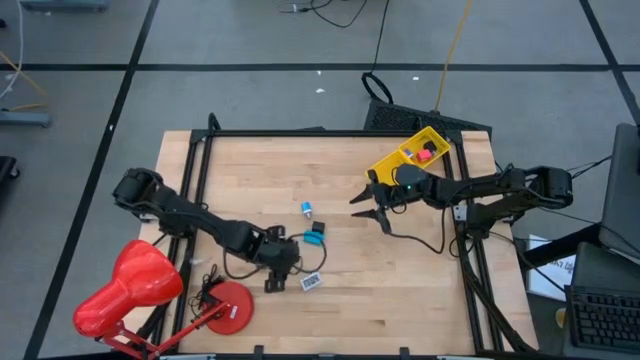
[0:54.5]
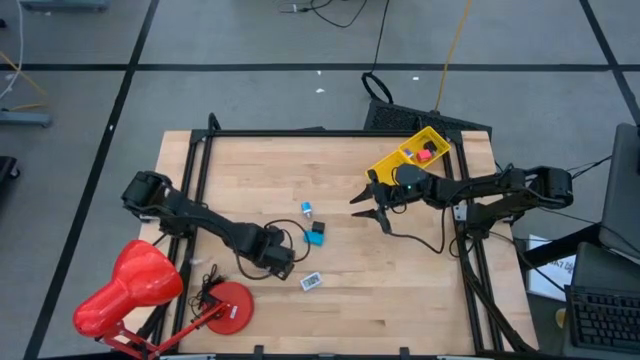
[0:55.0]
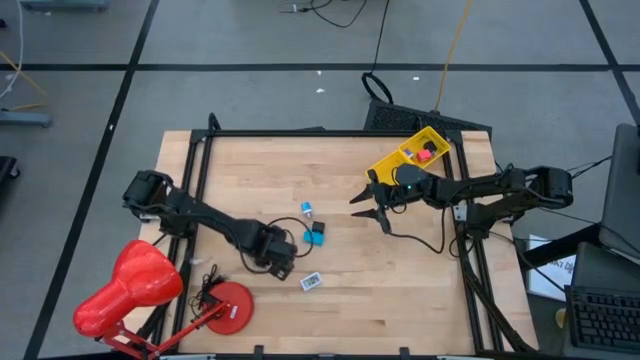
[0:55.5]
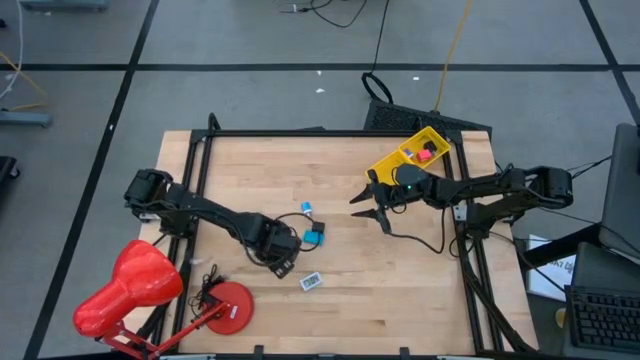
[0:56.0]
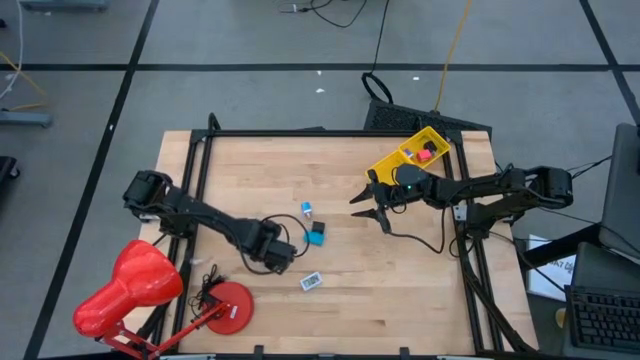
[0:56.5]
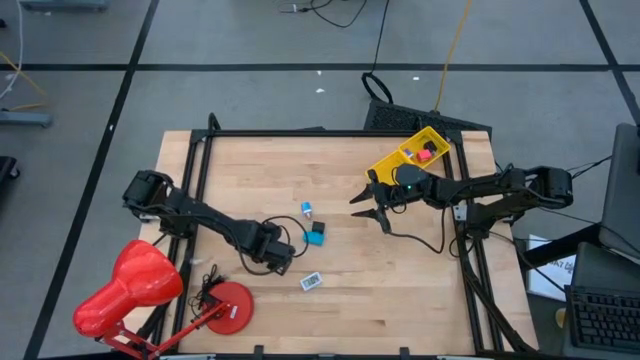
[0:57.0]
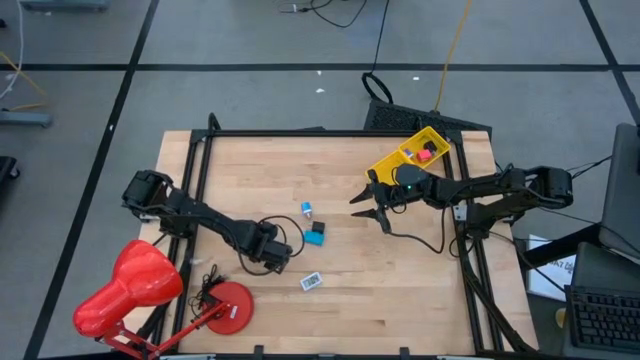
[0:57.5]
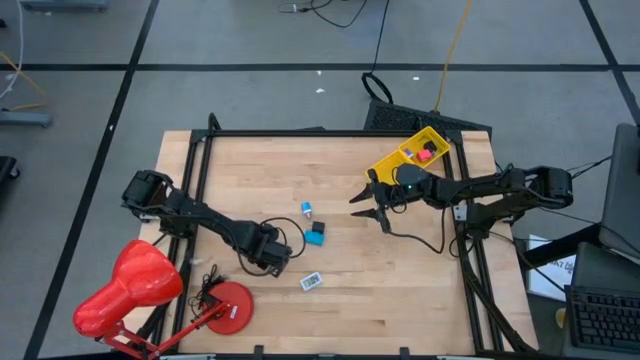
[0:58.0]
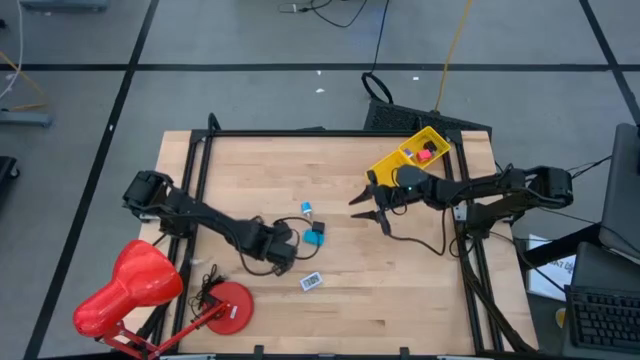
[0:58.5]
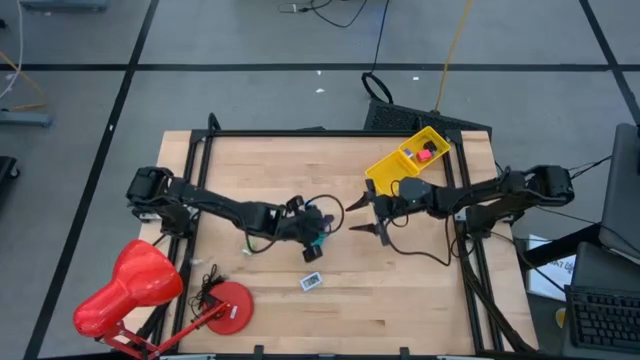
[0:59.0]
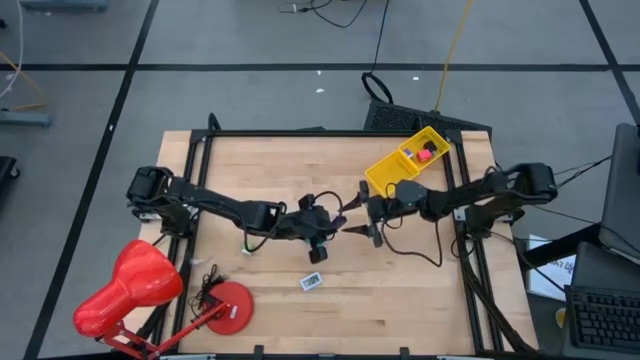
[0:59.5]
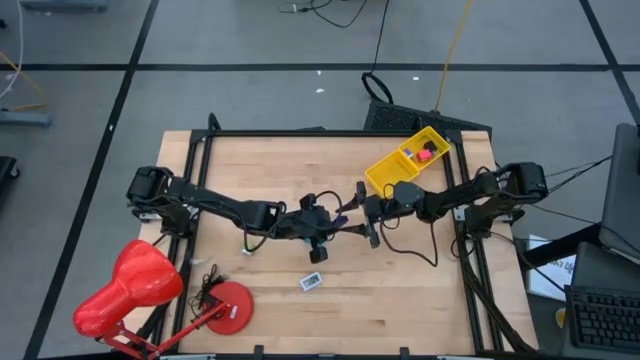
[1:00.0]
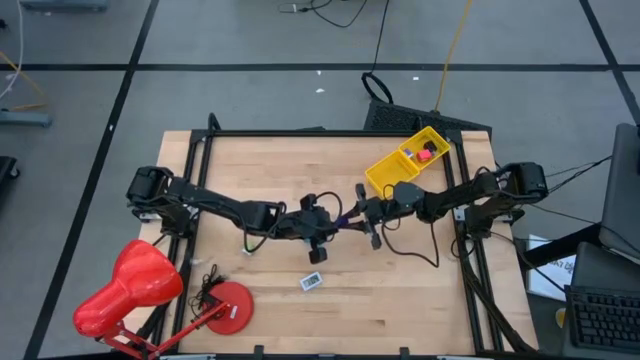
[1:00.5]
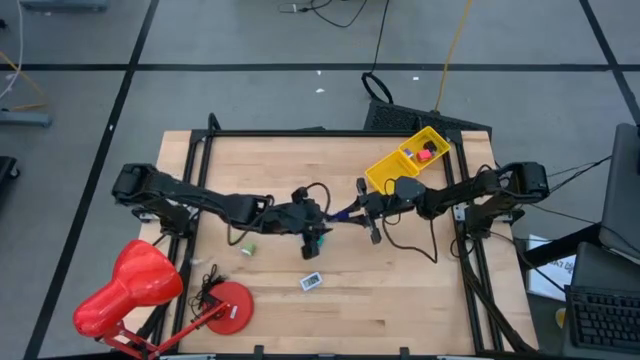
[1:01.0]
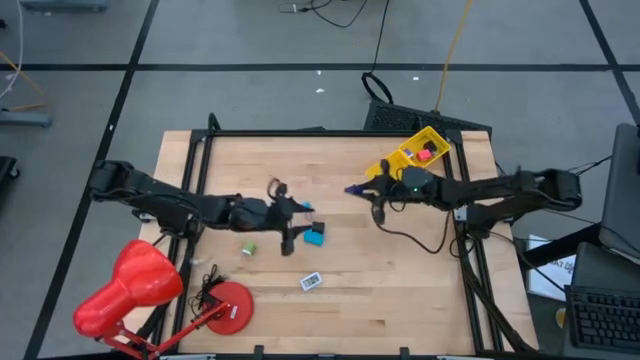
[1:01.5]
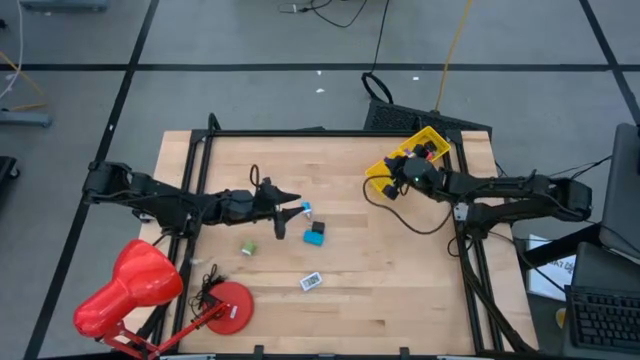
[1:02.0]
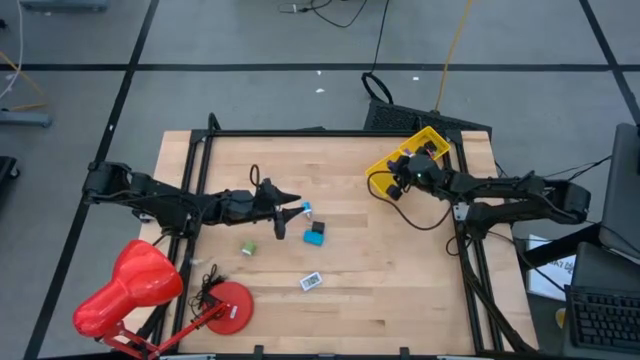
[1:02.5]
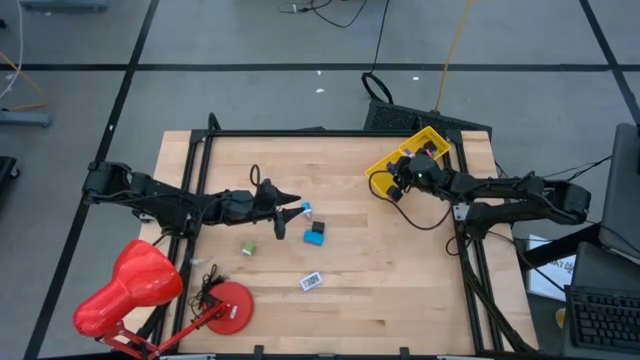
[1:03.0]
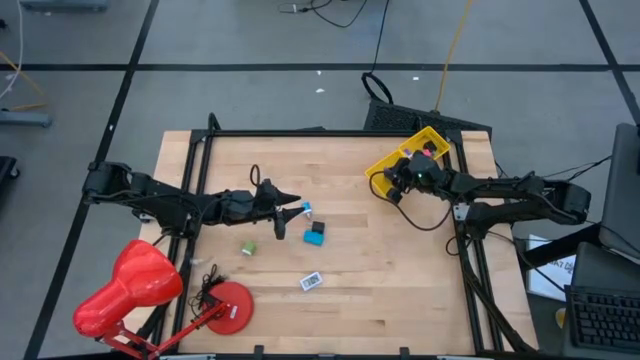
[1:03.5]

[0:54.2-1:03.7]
Task: Pick & Place Office items
Put the dark blue digital clock into the bottom yellow basket

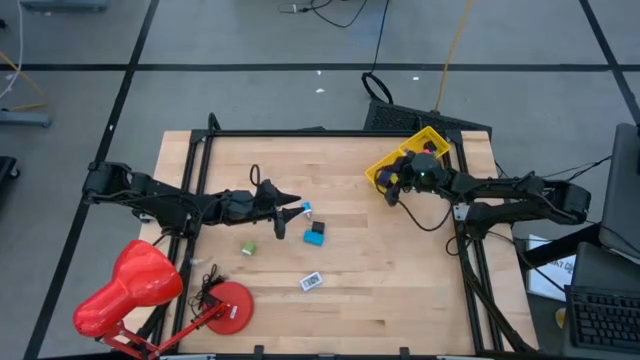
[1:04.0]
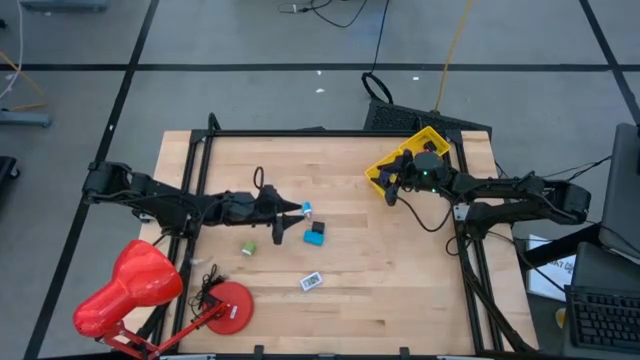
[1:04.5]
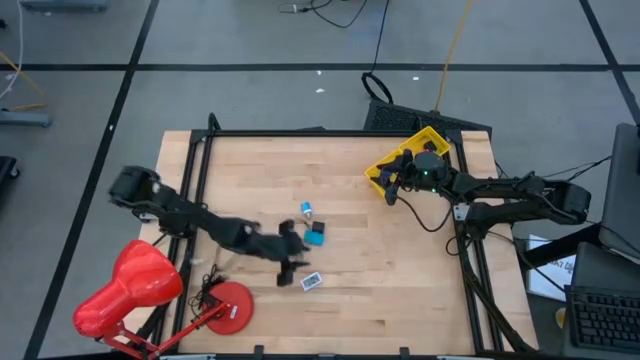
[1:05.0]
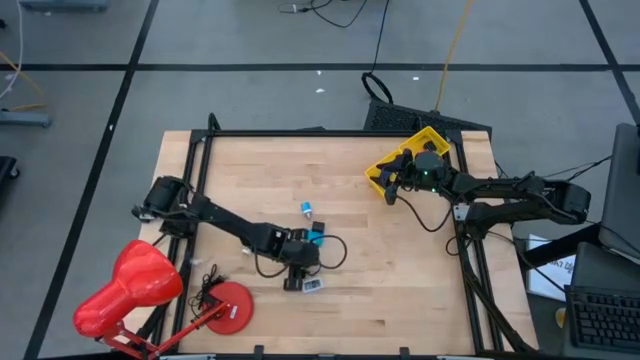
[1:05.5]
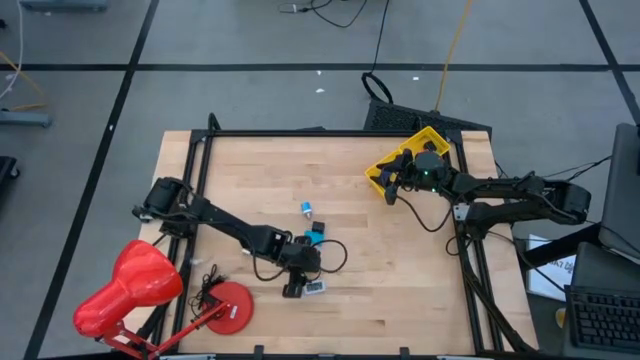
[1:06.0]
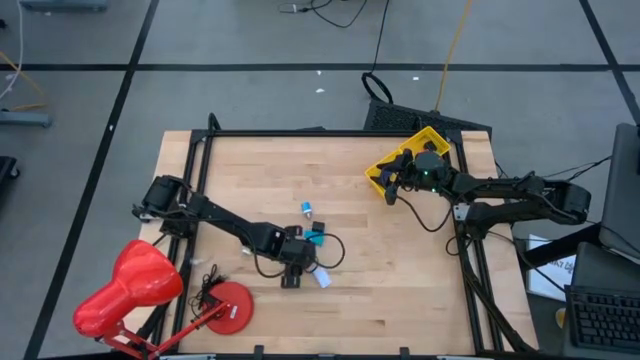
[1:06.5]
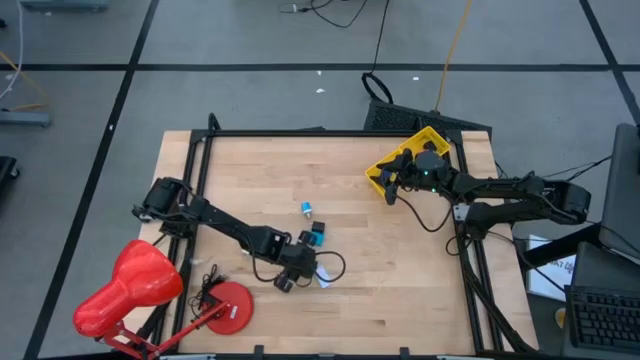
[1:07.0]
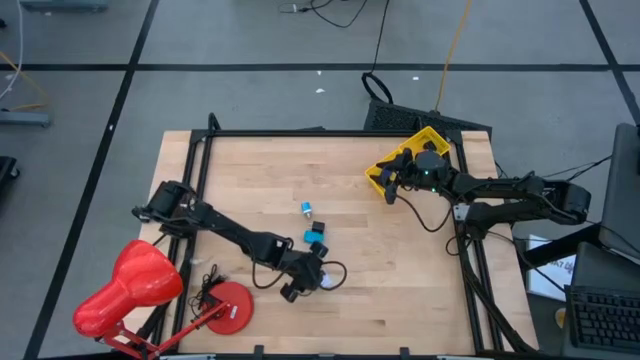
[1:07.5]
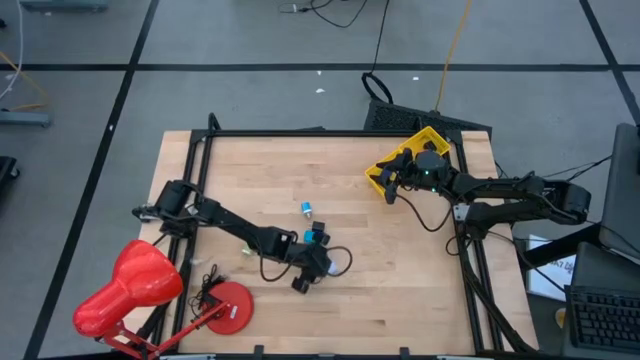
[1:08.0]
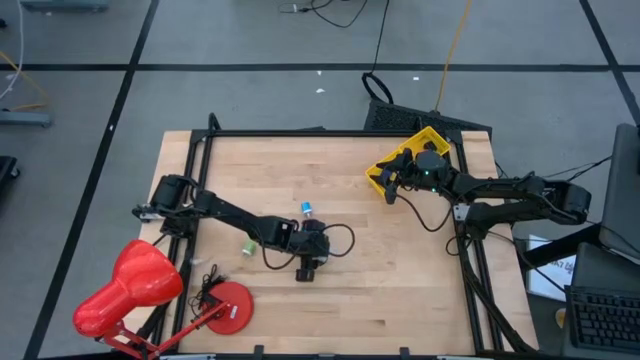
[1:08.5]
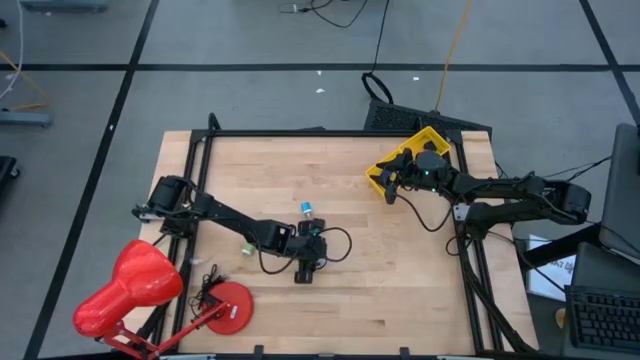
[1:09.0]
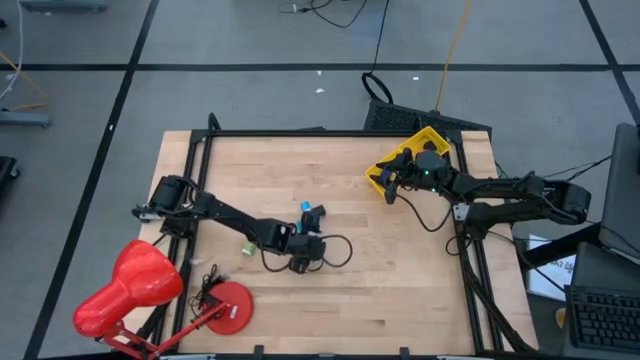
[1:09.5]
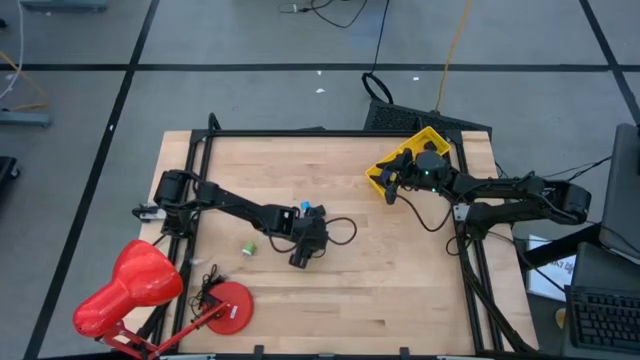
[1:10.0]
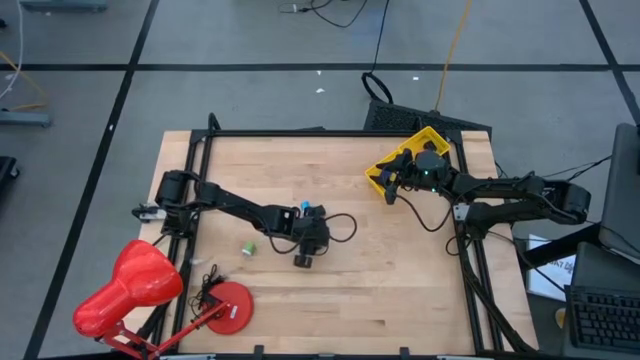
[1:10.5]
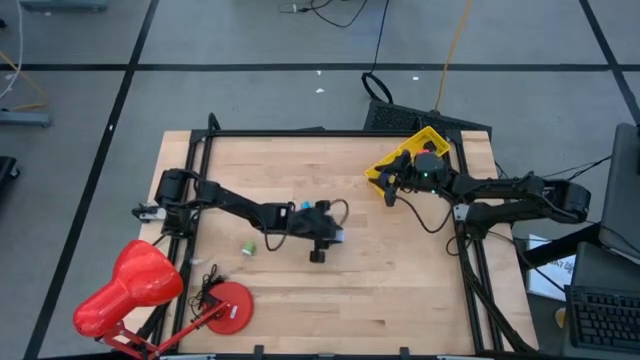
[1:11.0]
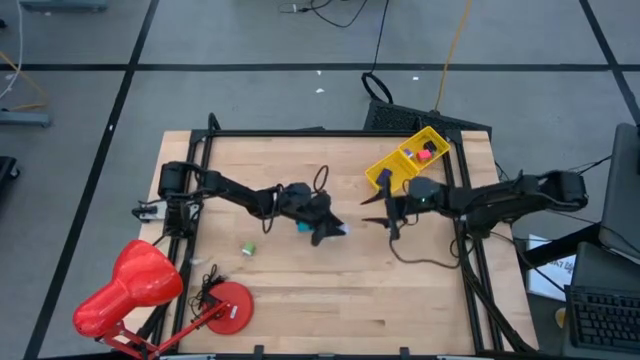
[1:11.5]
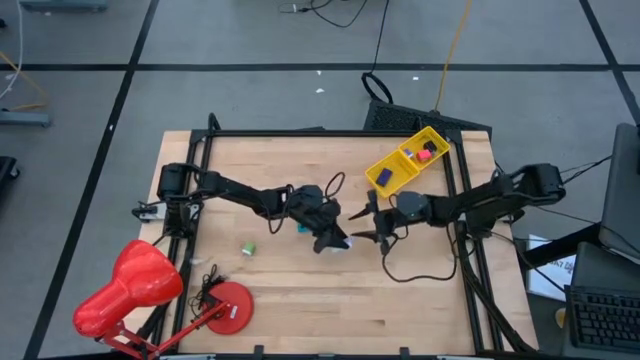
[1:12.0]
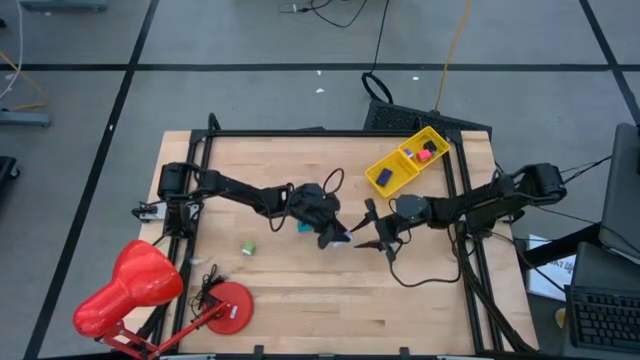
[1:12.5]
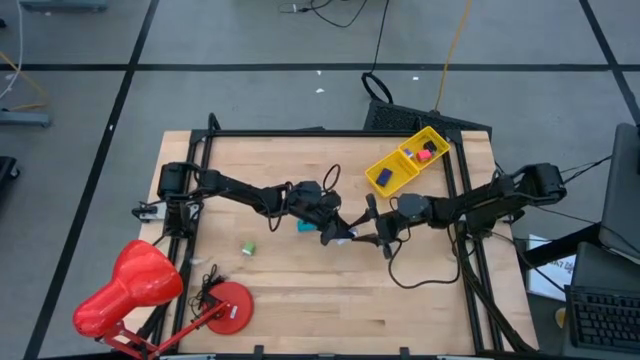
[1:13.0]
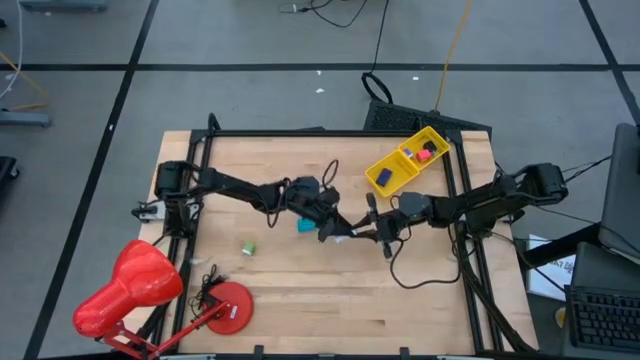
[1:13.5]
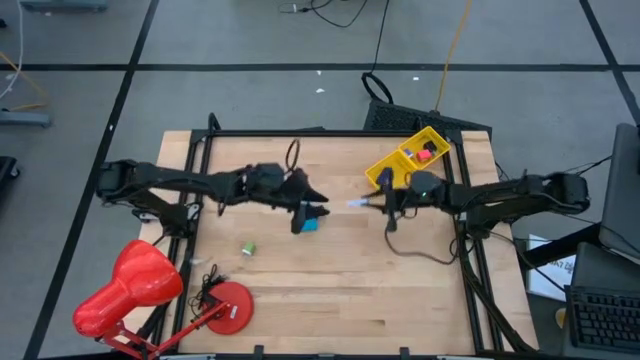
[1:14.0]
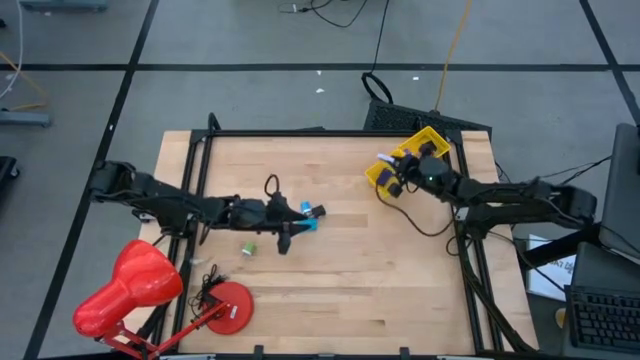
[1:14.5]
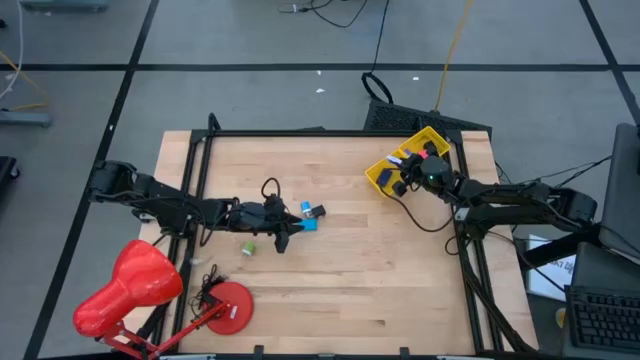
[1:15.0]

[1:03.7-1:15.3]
Put the white digital clock into the bottom yellow basket

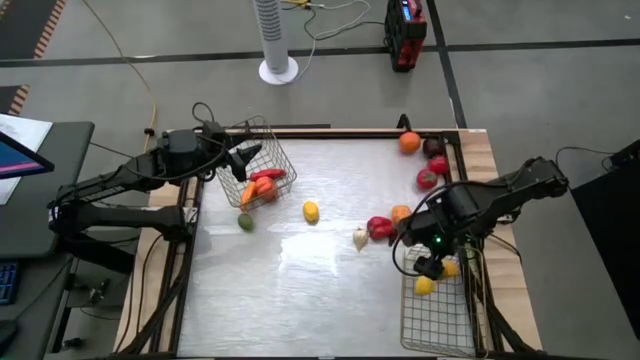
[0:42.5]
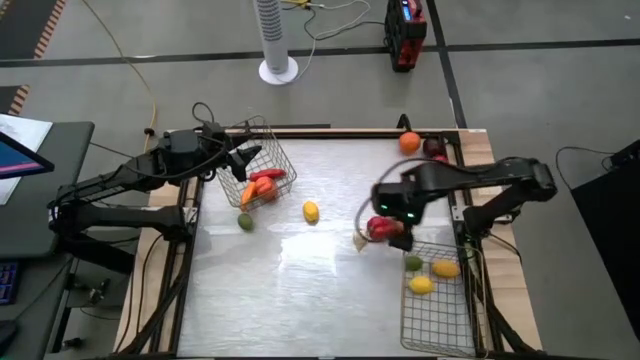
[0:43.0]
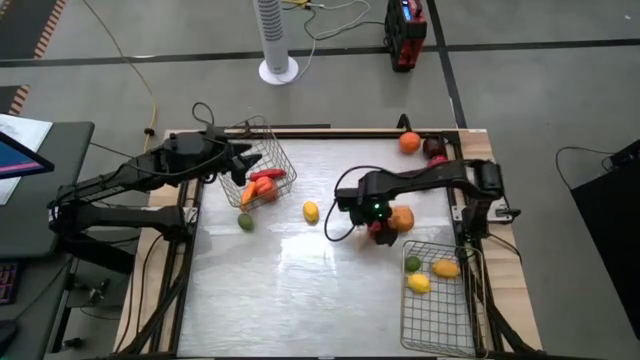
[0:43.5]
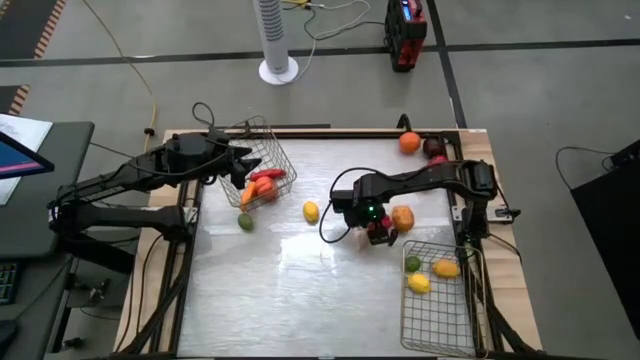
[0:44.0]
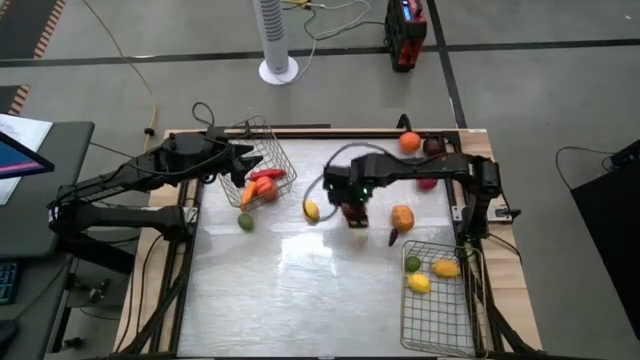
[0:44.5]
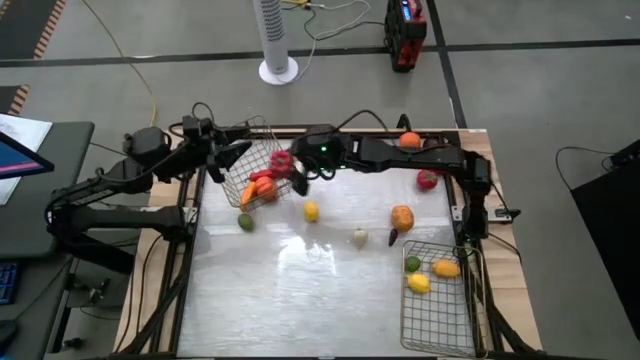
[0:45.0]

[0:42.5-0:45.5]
Task: Sort produce into baskets
Put the bell pepper into the top wire basket
